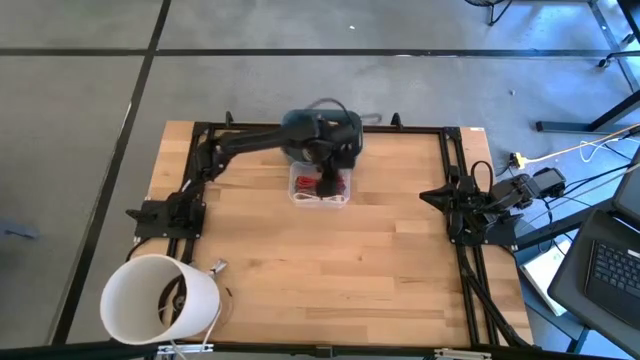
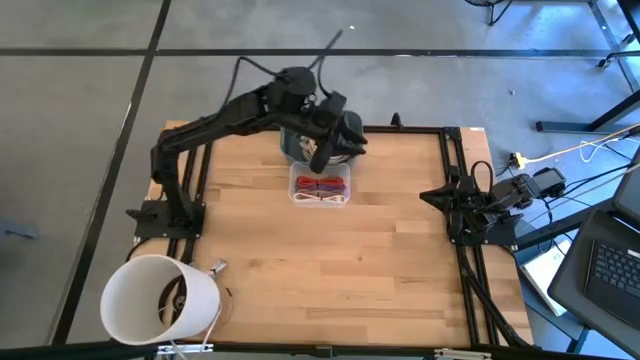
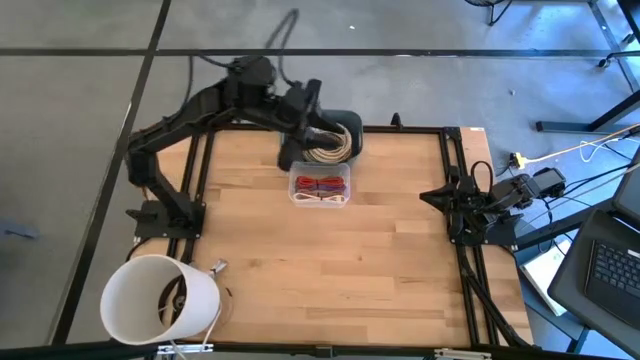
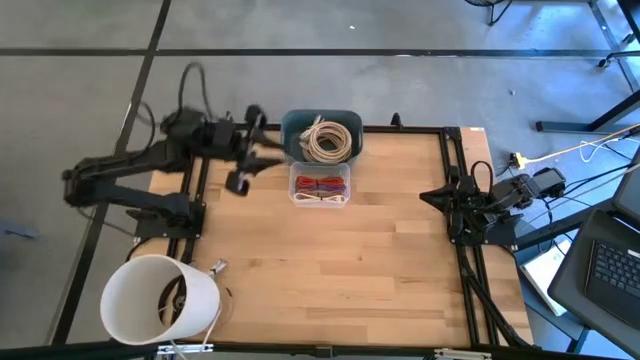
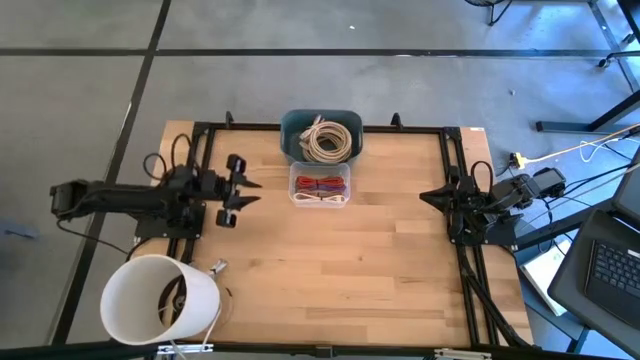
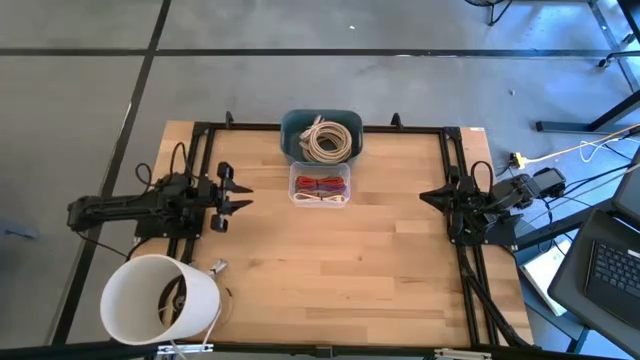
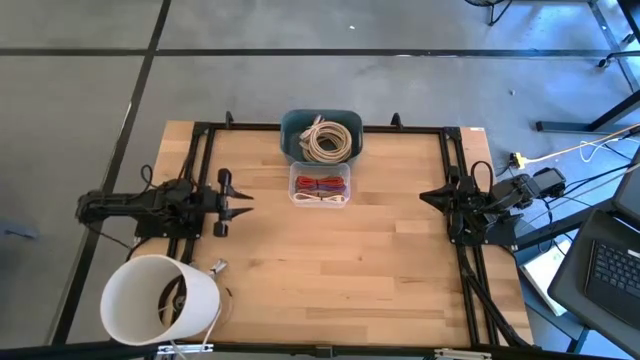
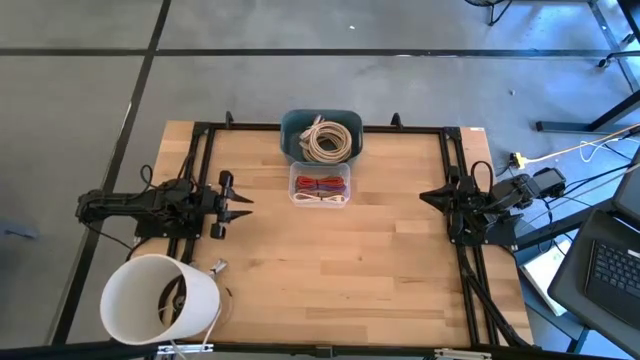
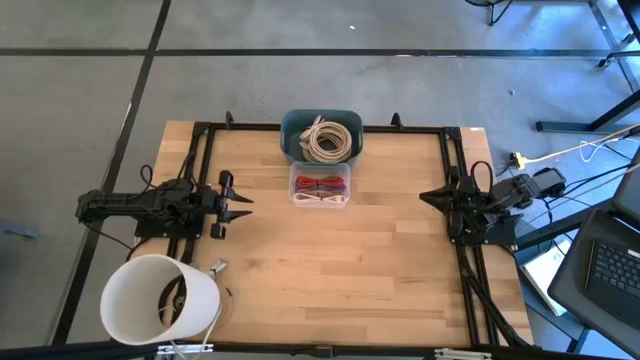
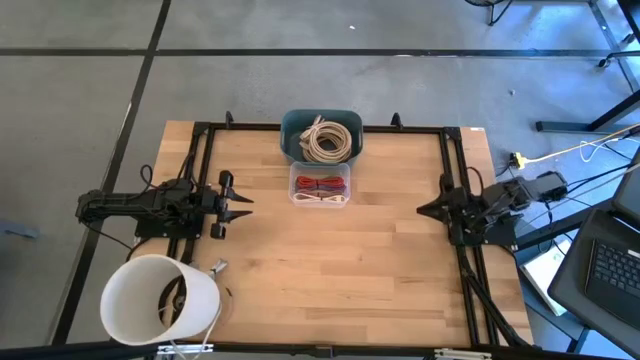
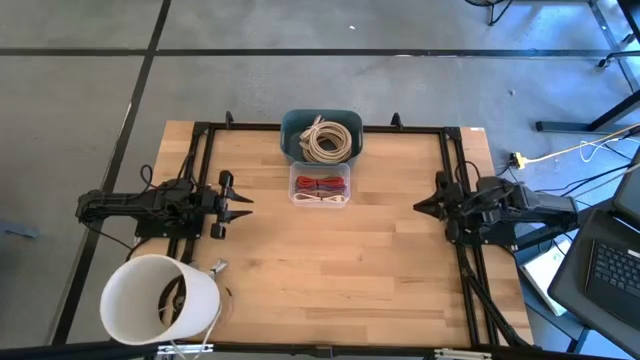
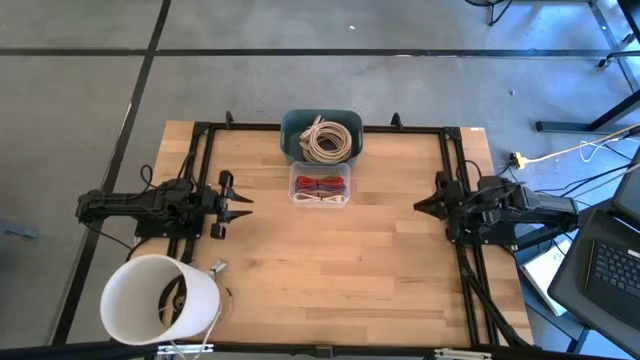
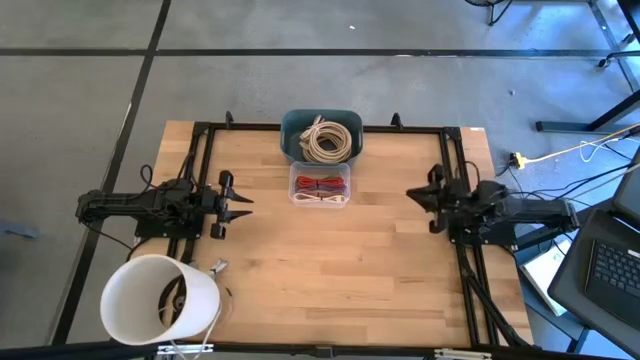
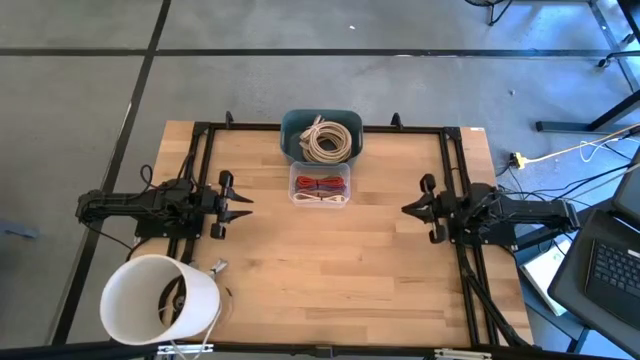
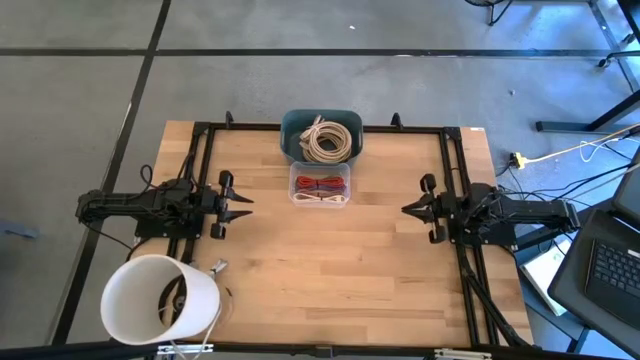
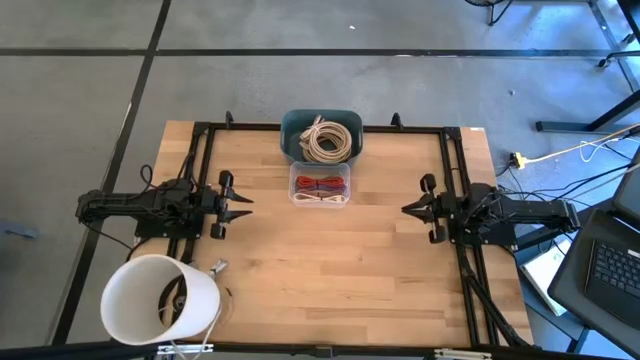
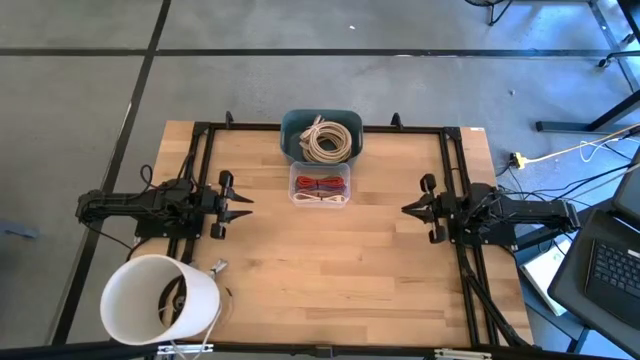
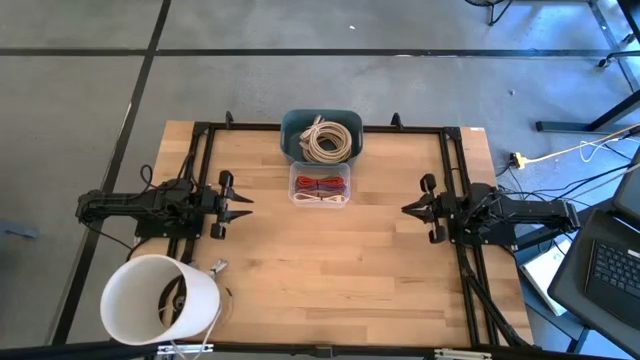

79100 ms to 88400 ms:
Return to Home Position
